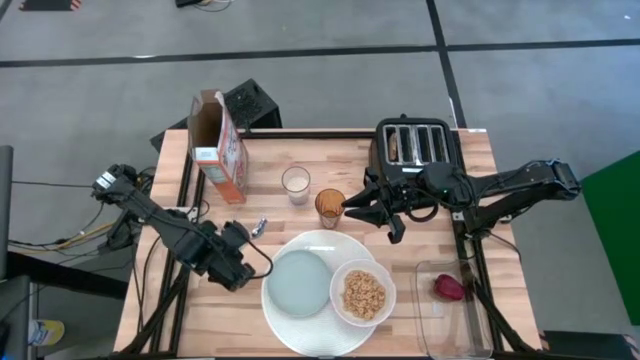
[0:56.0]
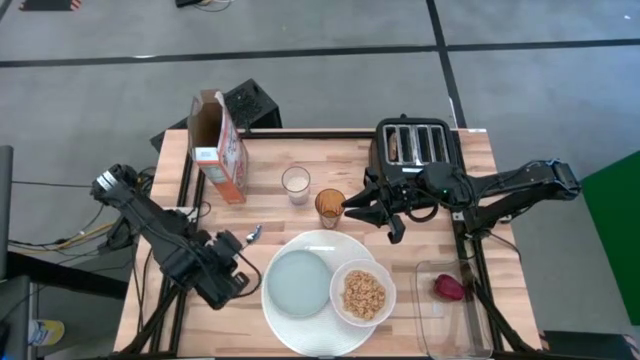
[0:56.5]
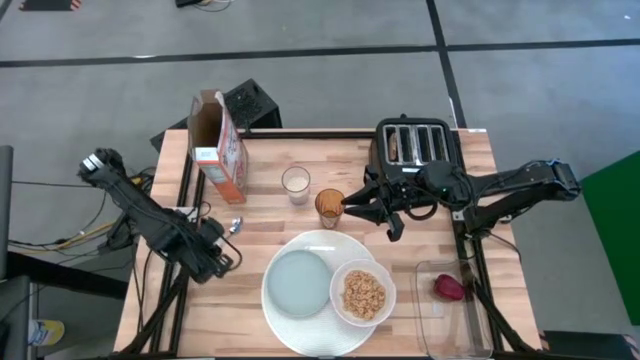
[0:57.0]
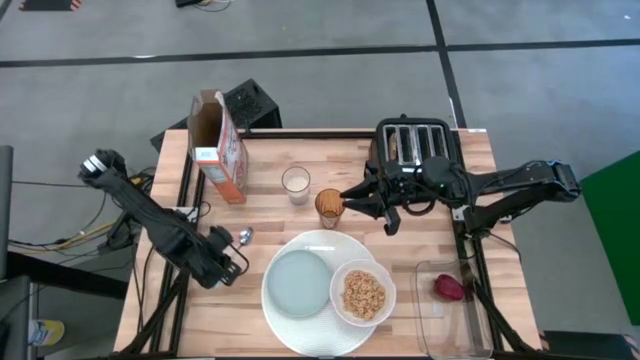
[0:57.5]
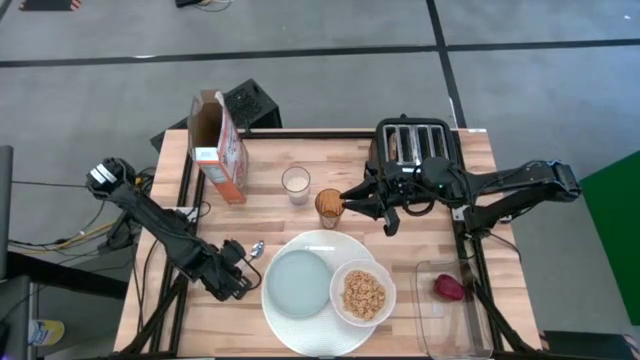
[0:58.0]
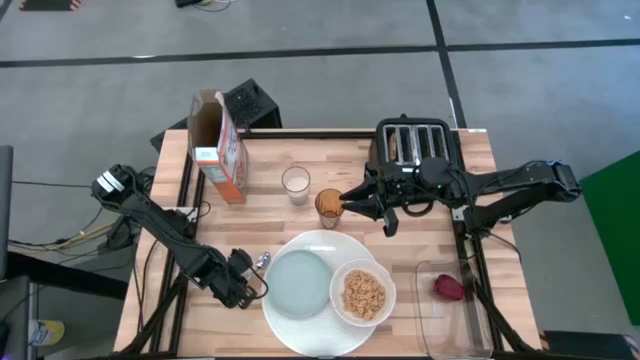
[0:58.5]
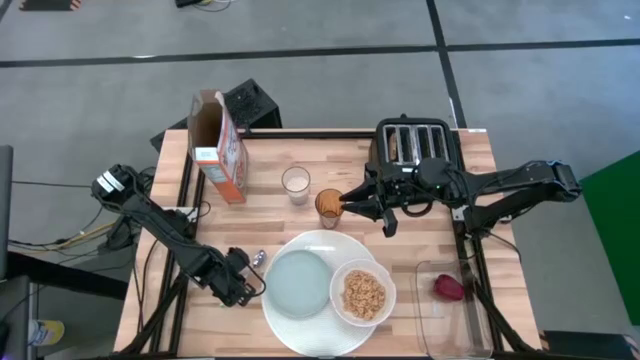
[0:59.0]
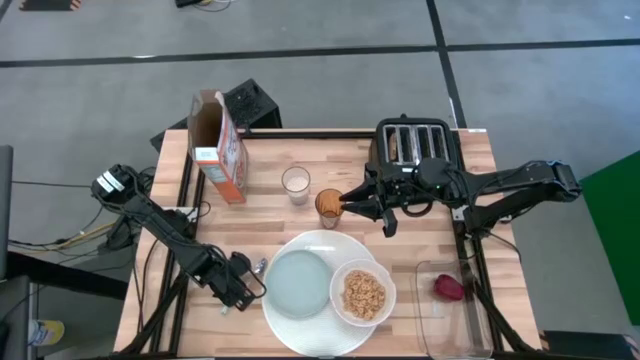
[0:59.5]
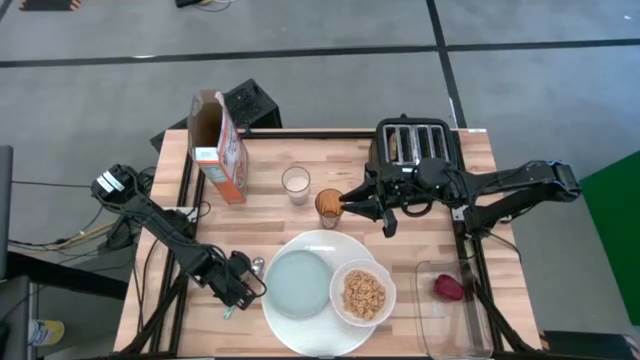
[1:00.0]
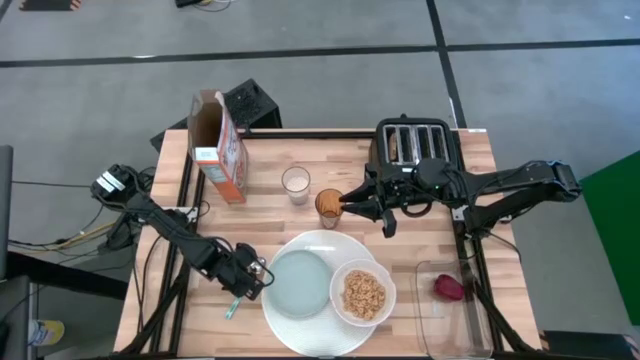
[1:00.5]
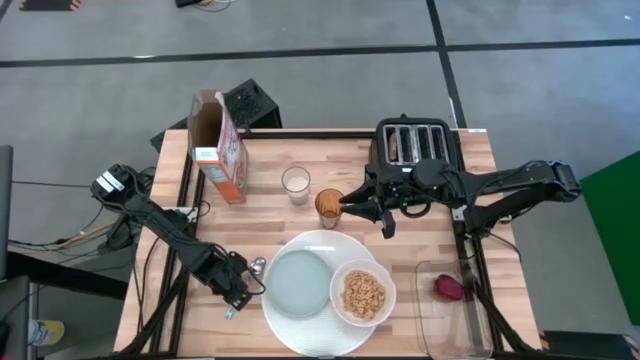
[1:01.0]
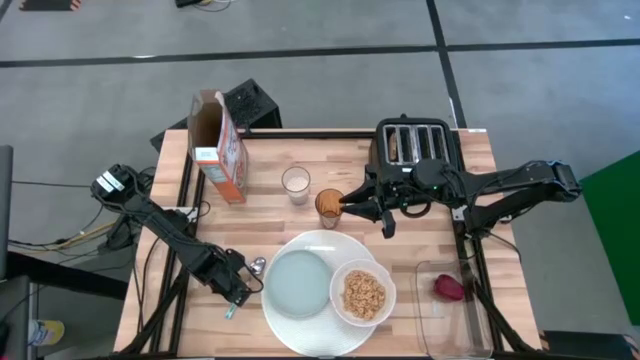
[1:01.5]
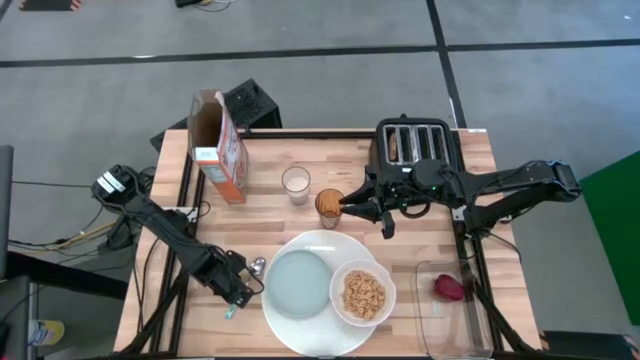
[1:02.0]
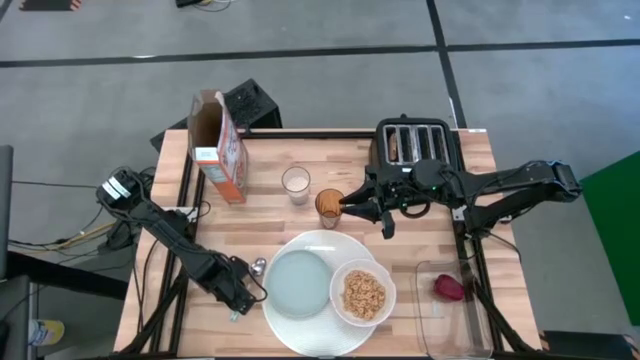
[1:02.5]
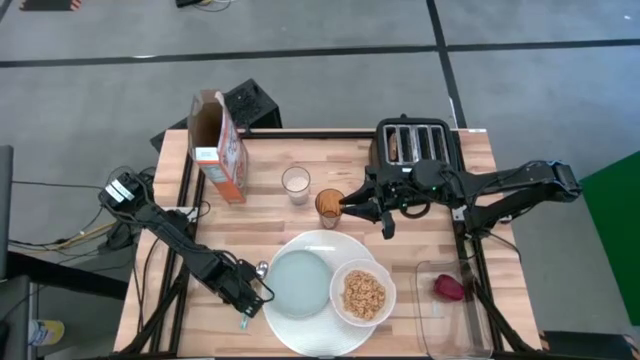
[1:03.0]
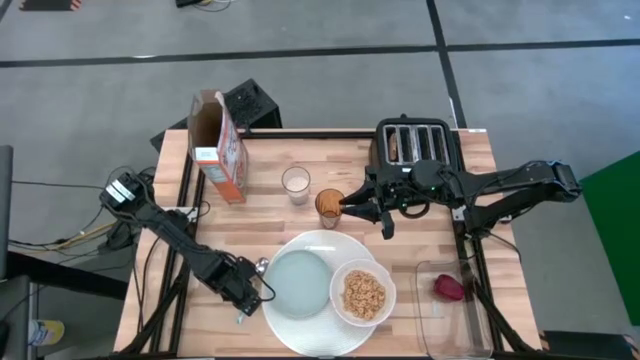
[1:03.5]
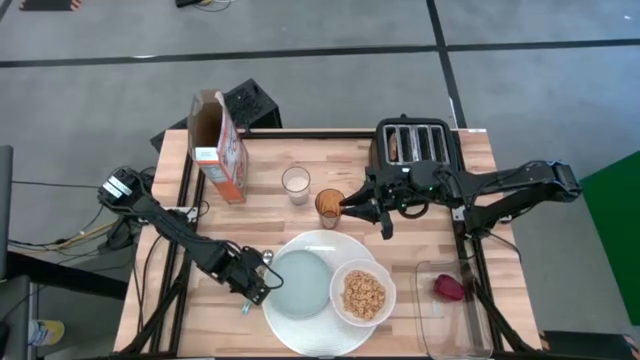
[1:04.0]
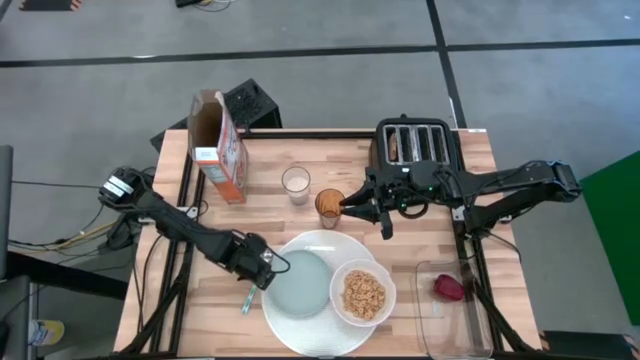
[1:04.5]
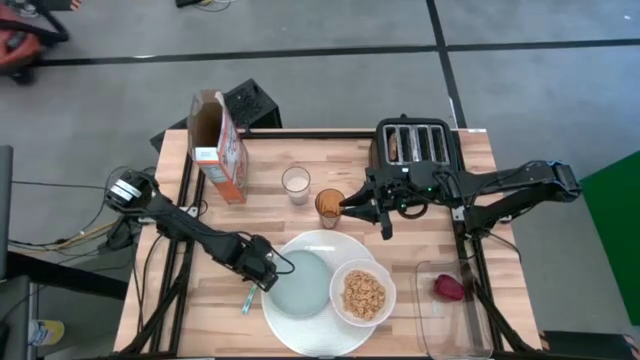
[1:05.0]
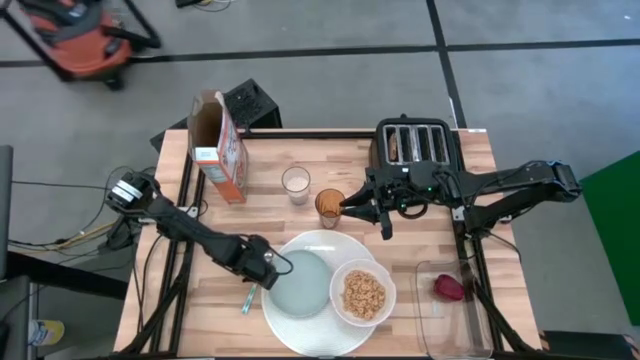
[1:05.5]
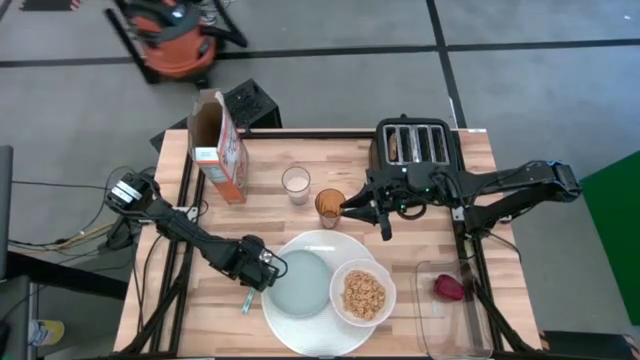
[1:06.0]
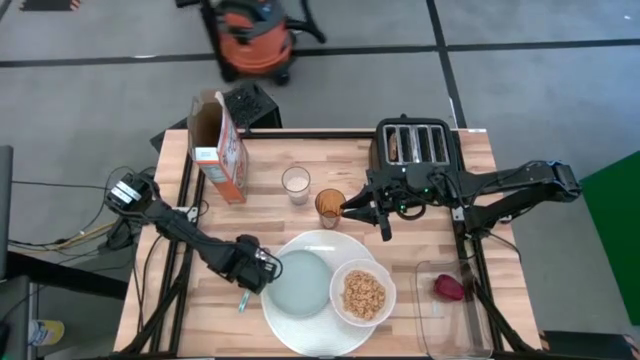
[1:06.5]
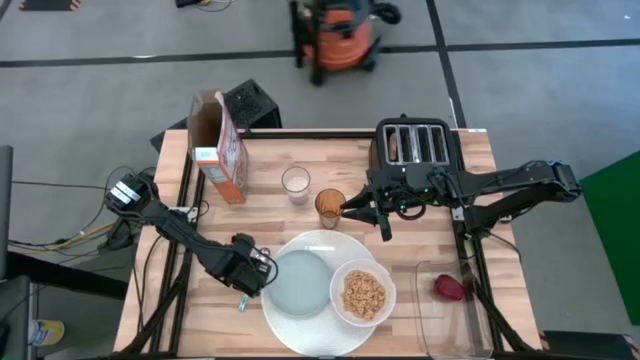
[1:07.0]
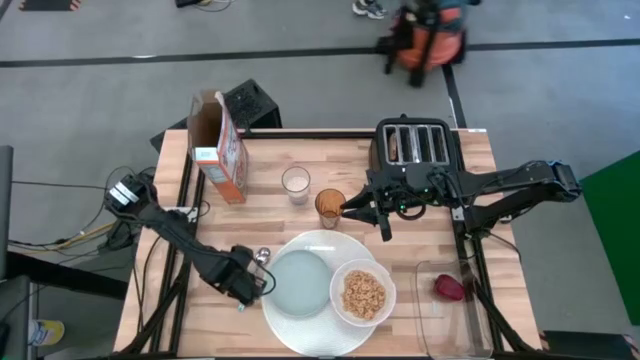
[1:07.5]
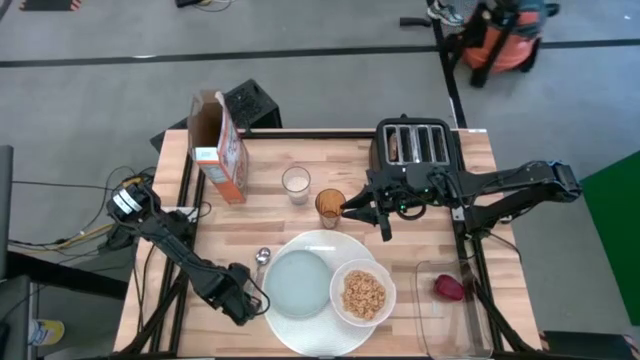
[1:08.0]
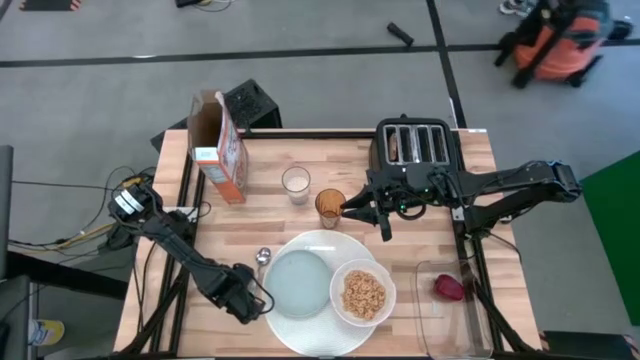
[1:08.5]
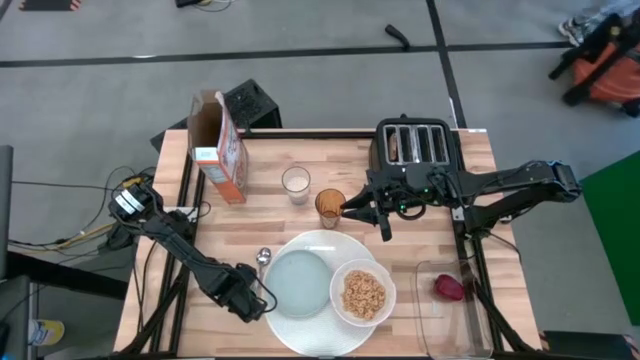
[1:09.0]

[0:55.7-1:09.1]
Task: Arrange a breakfast setting
Put the blue patterned spoon to the left of the gray plate

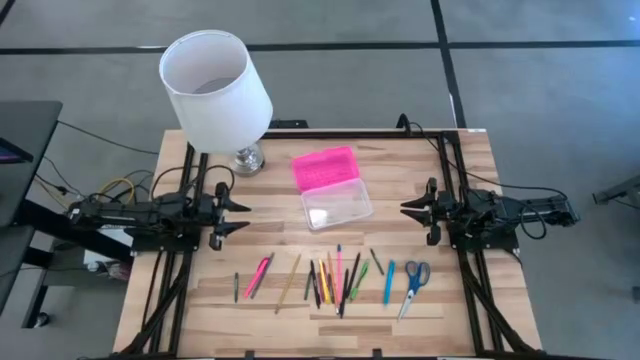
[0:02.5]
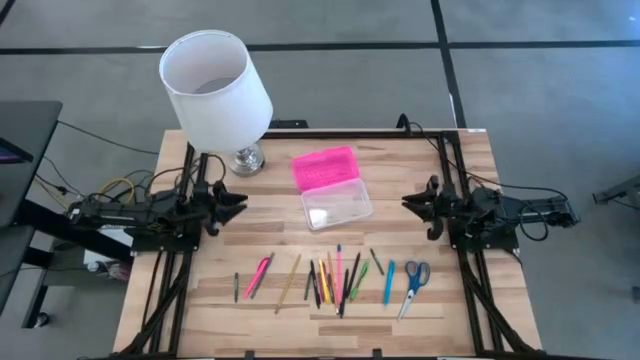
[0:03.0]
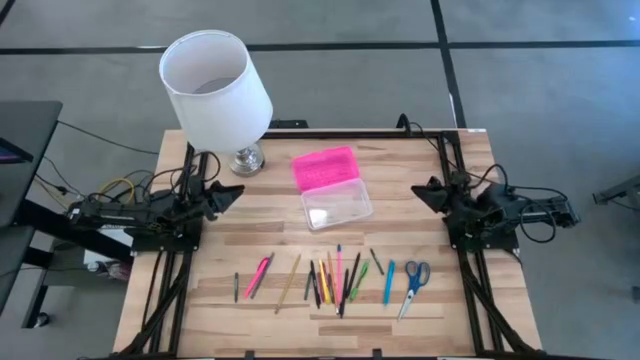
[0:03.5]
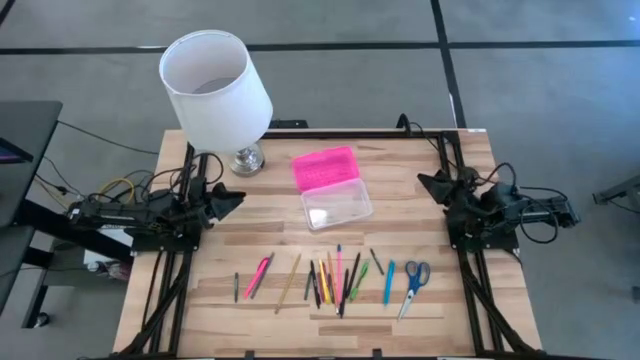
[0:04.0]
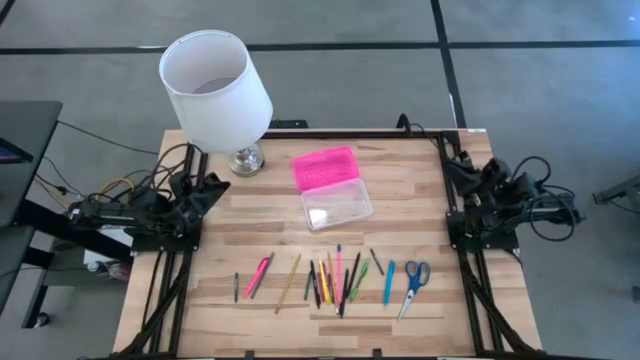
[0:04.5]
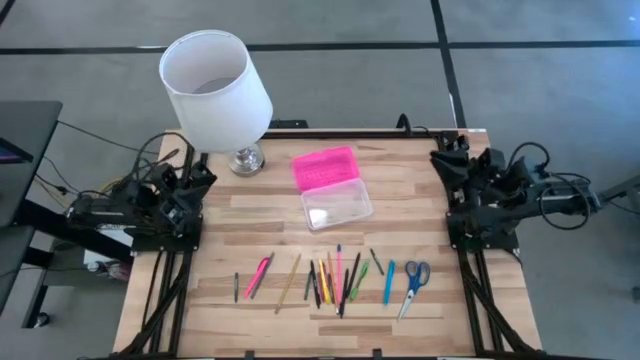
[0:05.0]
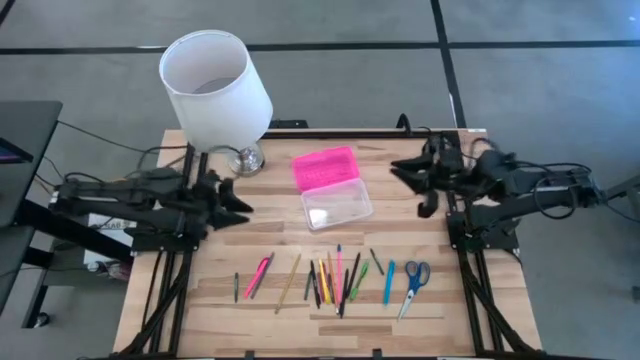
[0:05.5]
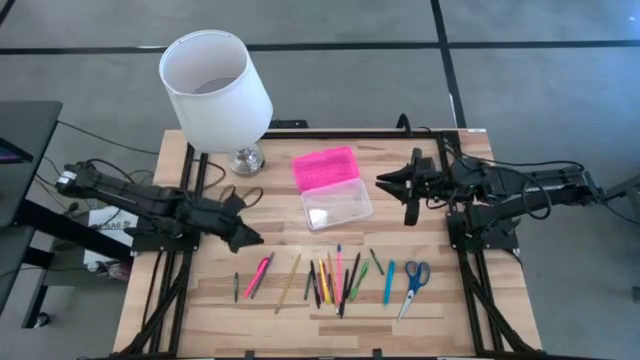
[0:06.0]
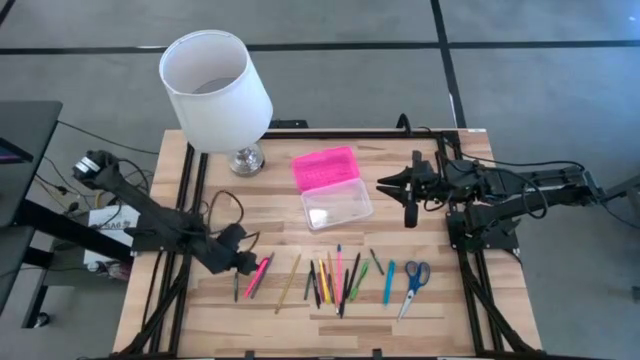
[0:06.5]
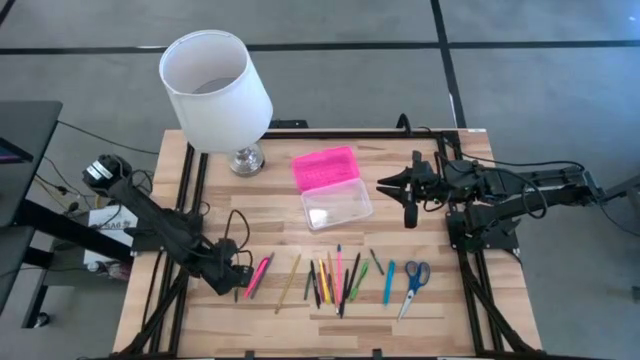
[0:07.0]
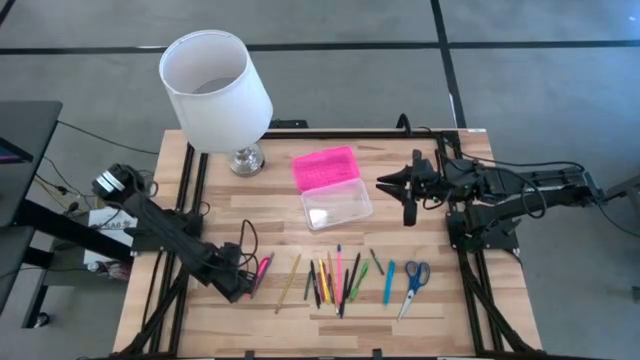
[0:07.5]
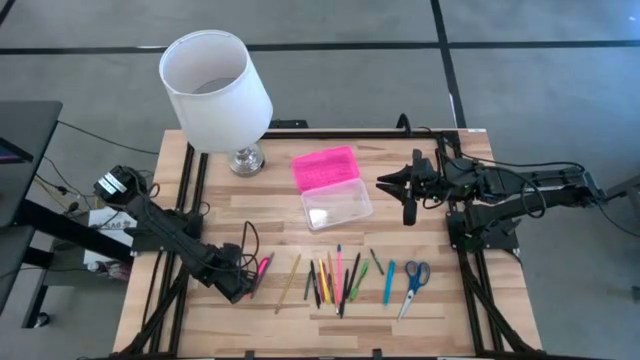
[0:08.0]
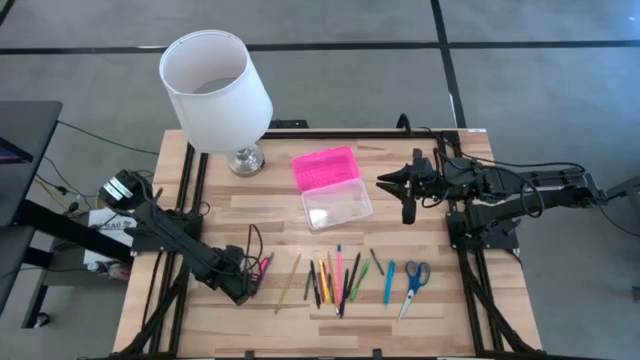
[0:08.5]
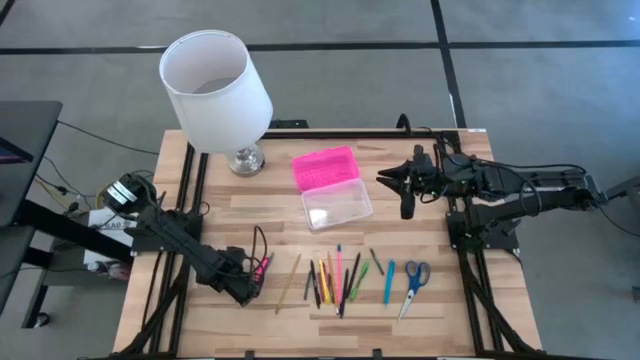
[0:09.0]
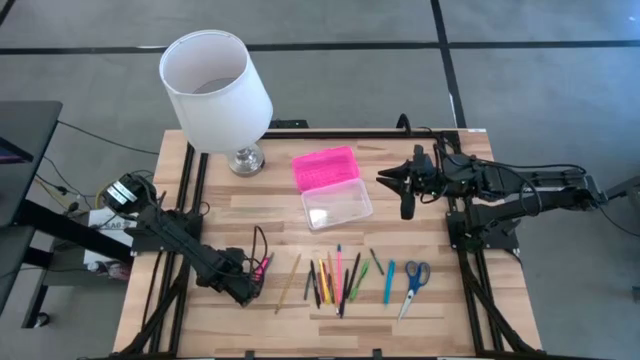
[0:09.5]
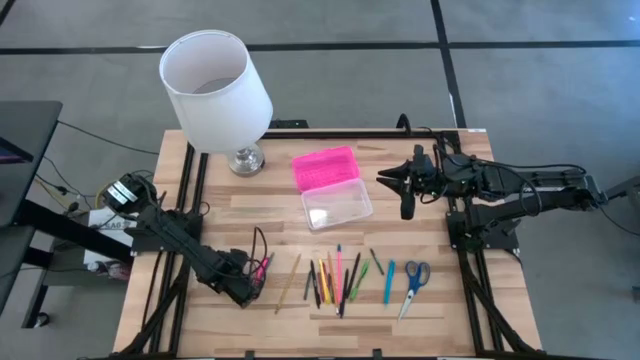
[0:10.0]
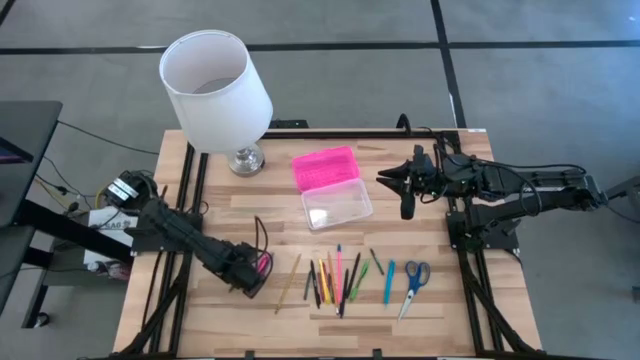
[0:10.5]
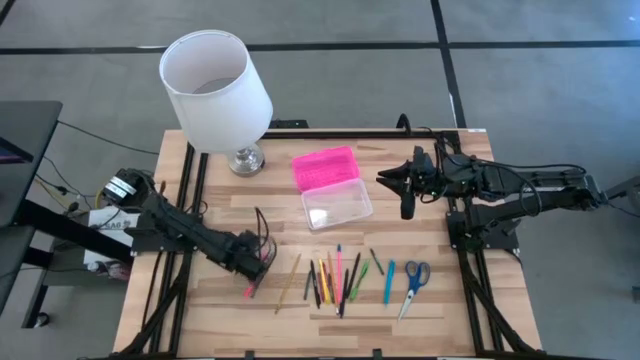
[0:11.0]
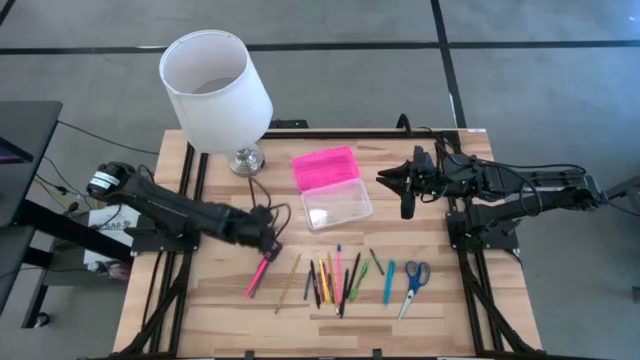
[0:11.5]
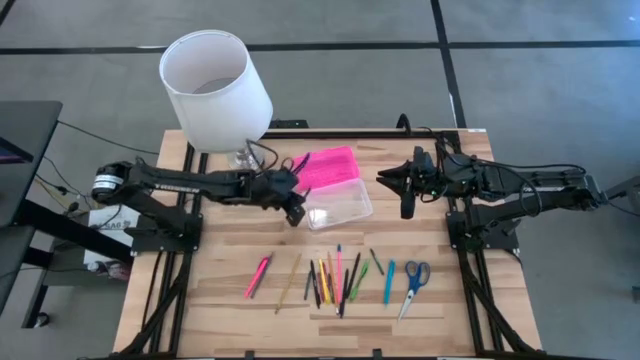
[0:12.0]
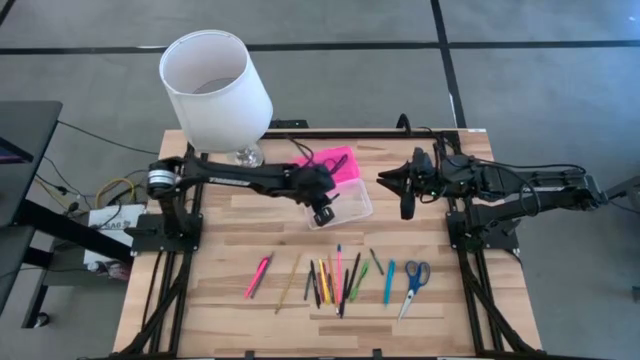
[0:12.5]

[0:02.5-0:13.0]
Task: Pick & place school supplies into a supply box
Put the green crayon into the pink supply box
